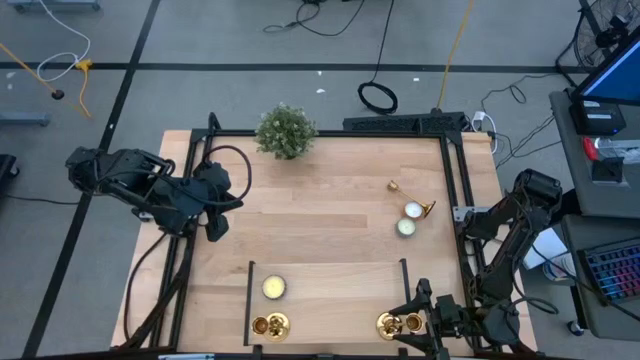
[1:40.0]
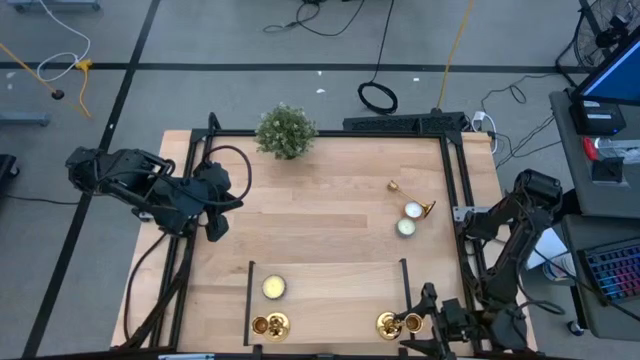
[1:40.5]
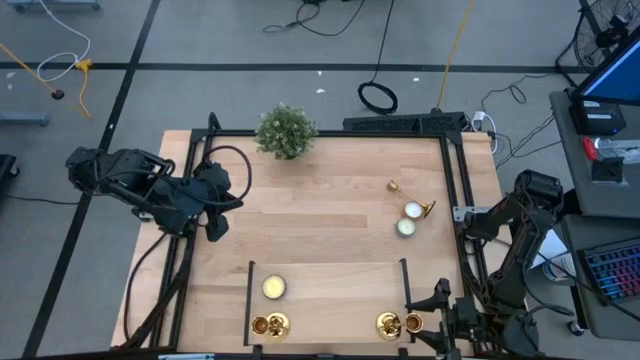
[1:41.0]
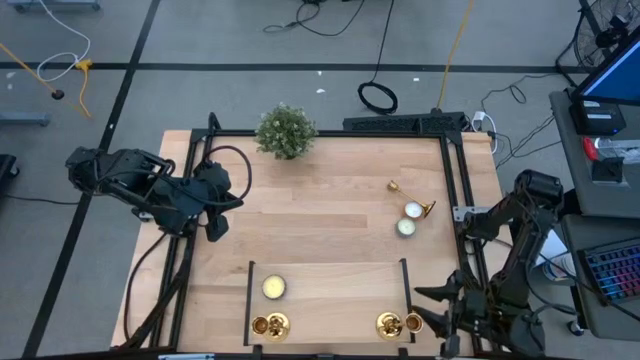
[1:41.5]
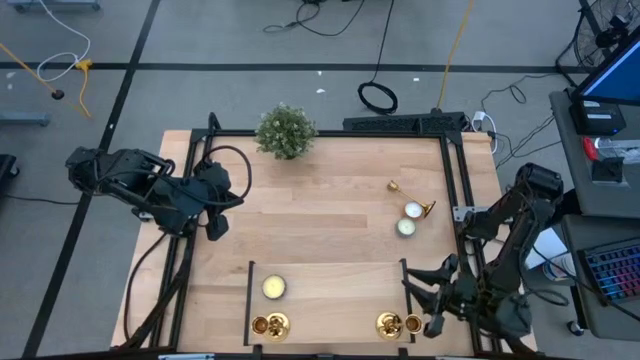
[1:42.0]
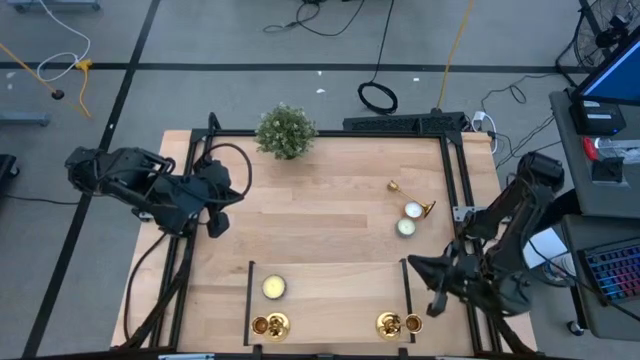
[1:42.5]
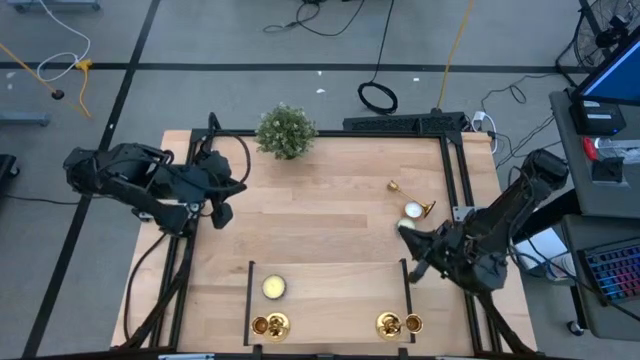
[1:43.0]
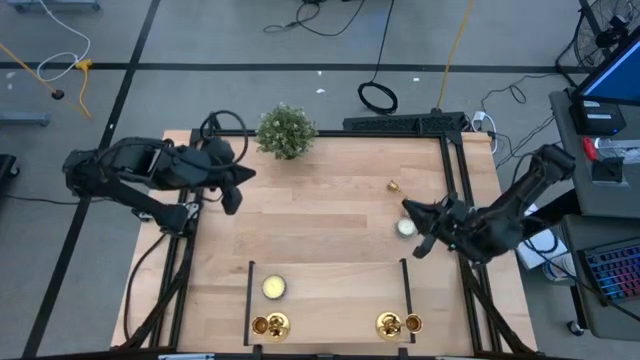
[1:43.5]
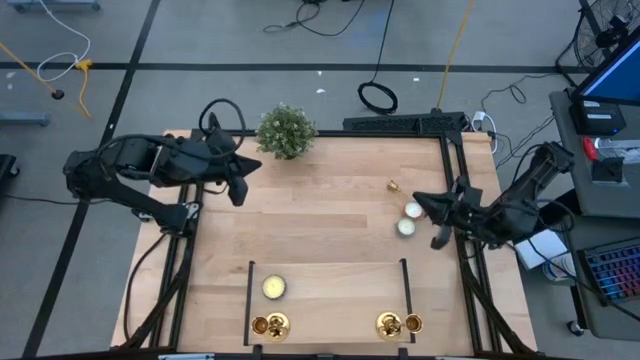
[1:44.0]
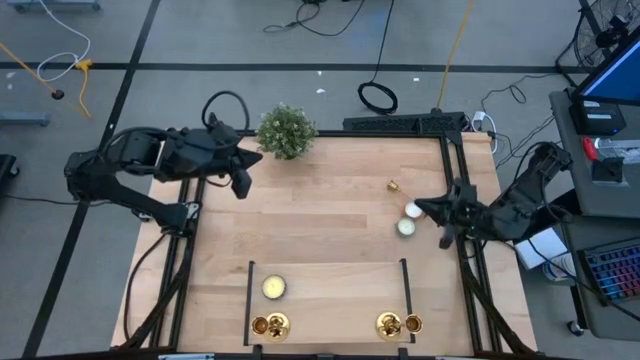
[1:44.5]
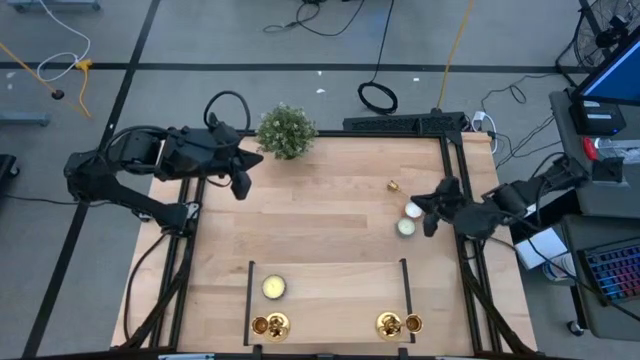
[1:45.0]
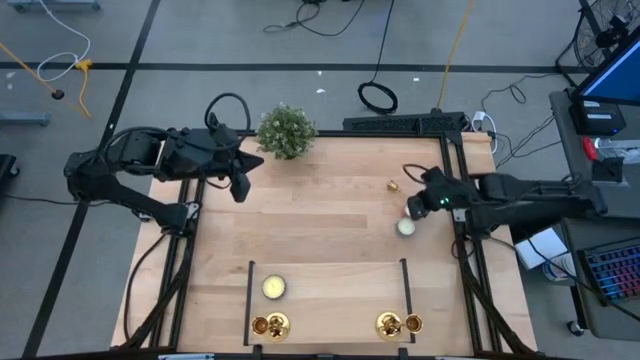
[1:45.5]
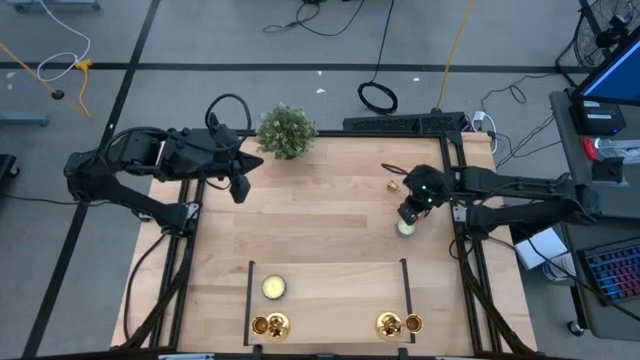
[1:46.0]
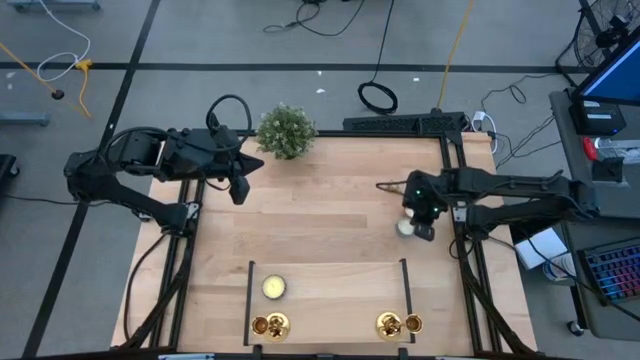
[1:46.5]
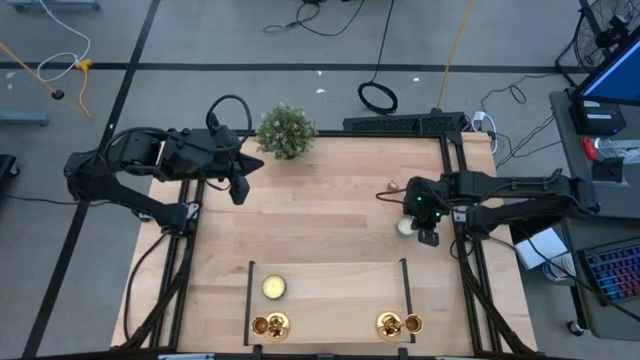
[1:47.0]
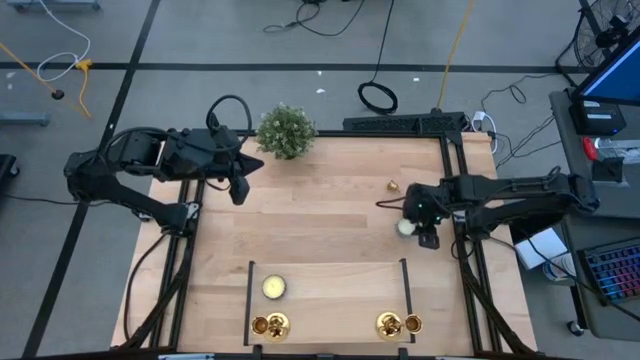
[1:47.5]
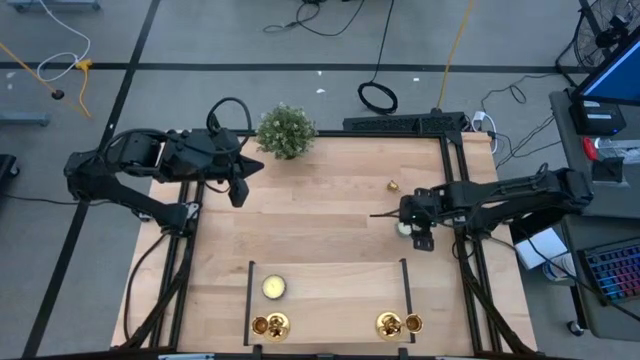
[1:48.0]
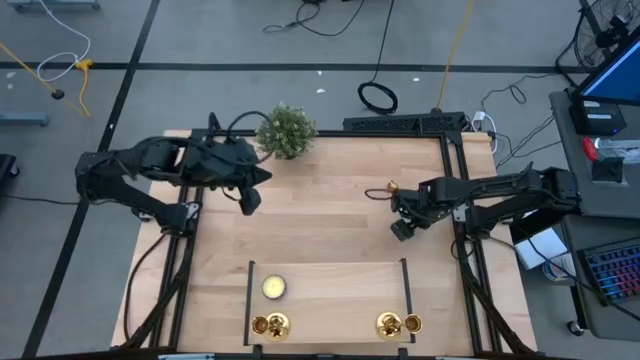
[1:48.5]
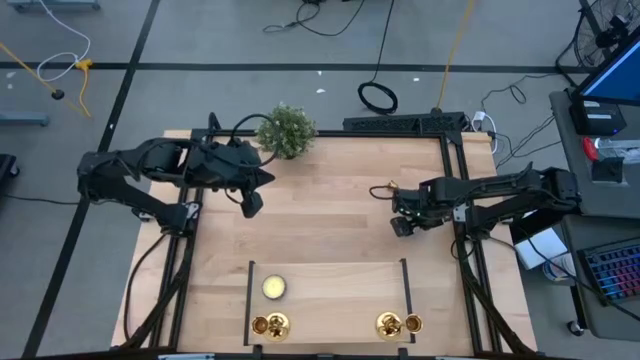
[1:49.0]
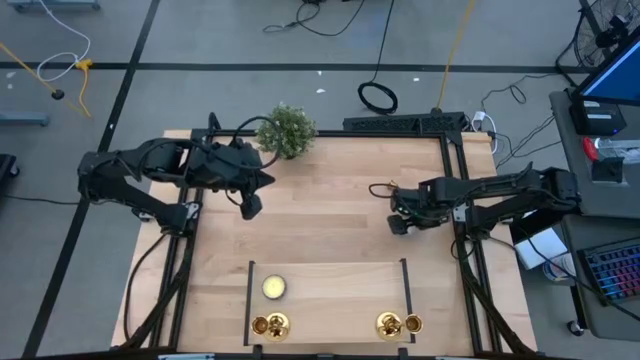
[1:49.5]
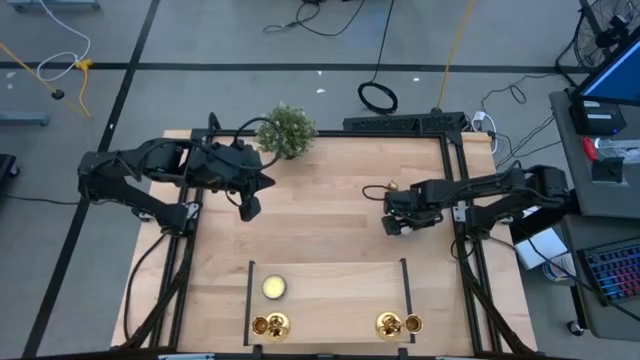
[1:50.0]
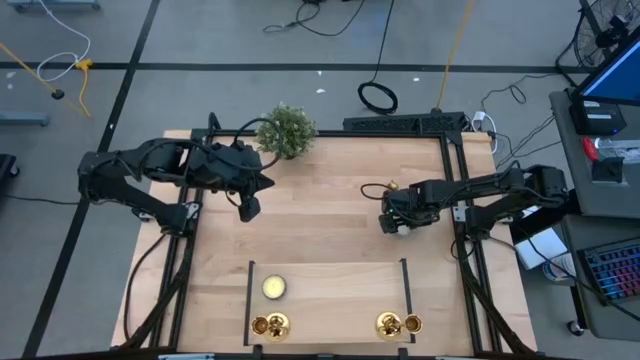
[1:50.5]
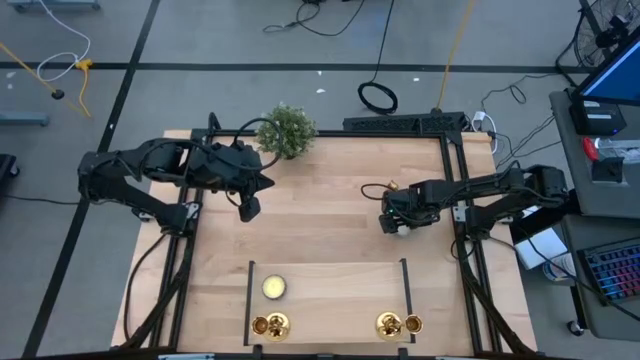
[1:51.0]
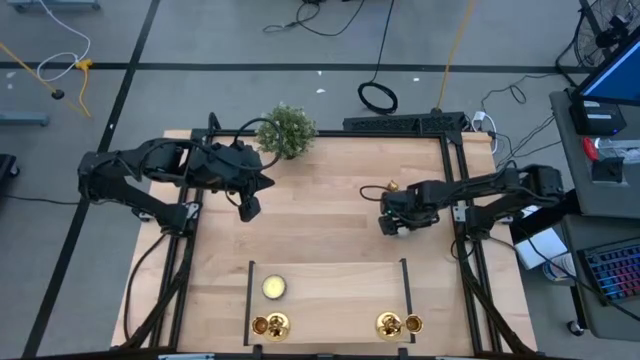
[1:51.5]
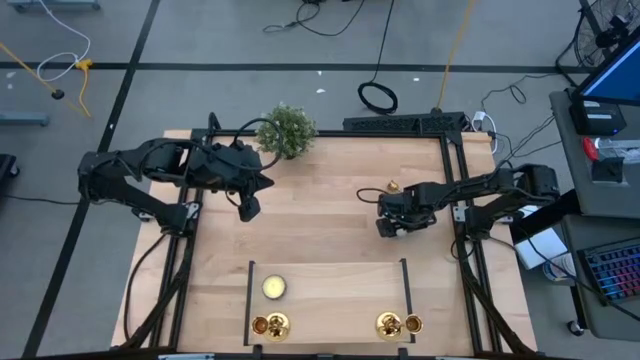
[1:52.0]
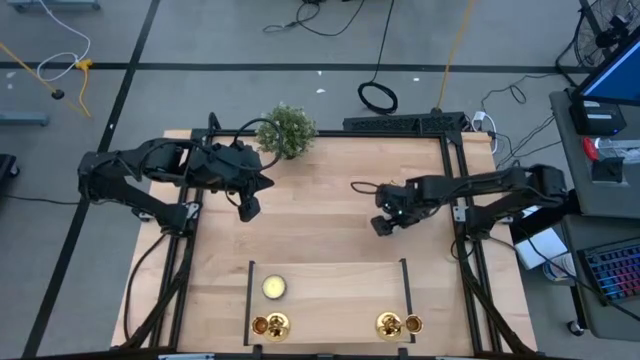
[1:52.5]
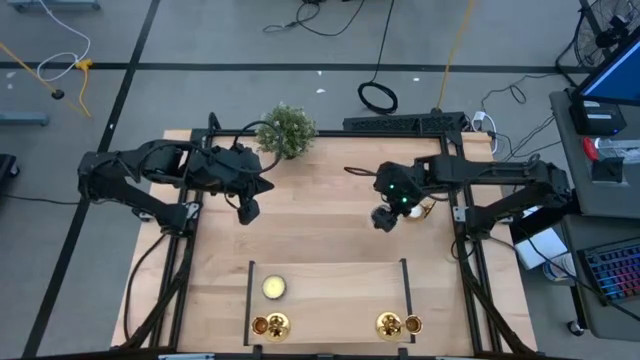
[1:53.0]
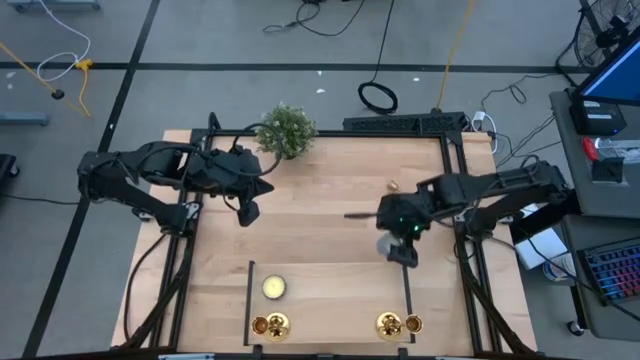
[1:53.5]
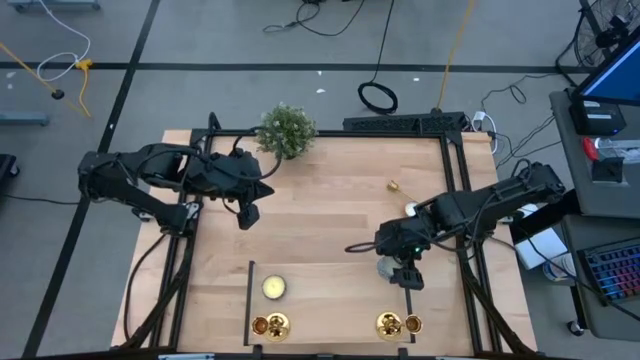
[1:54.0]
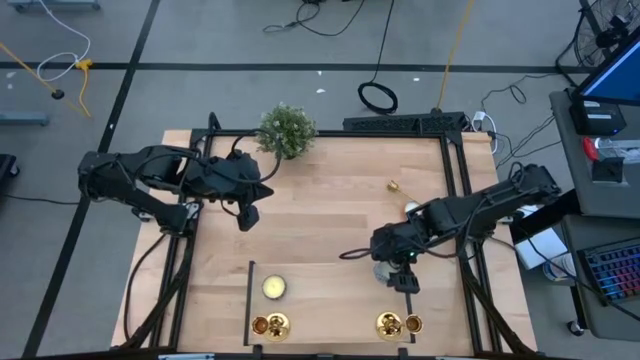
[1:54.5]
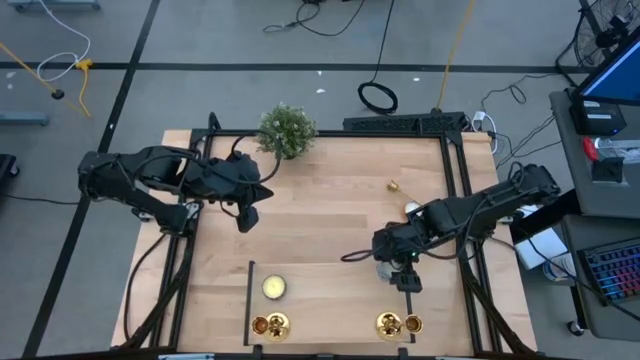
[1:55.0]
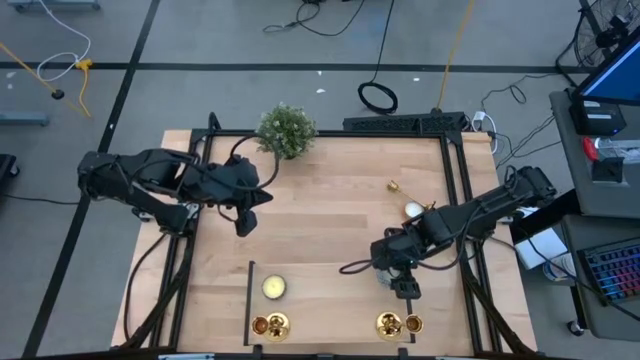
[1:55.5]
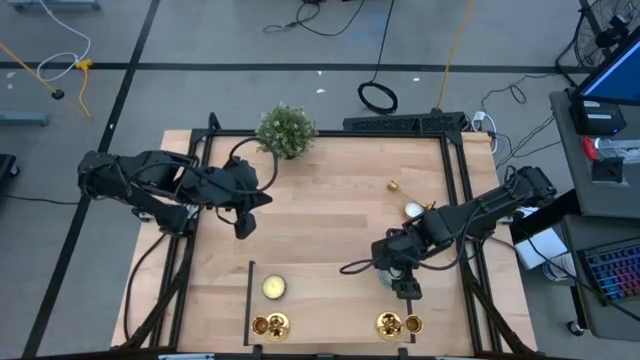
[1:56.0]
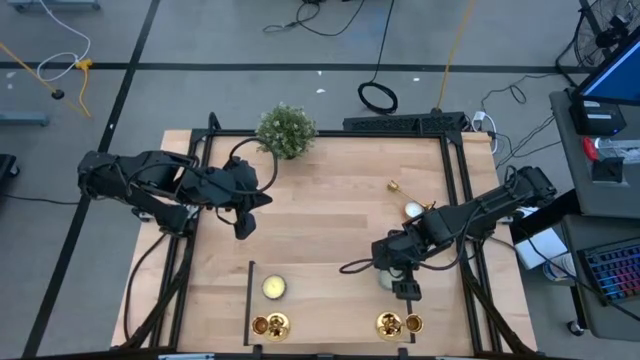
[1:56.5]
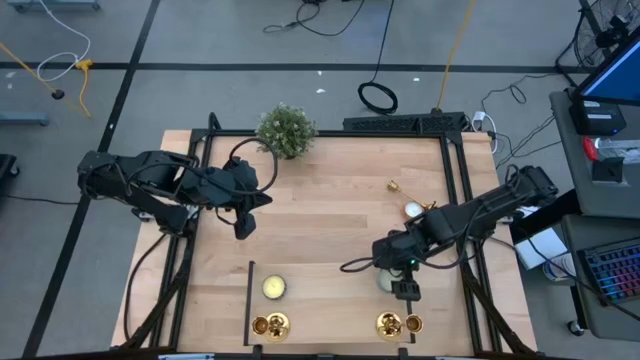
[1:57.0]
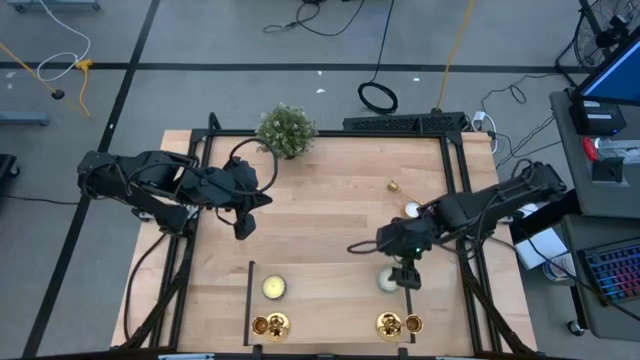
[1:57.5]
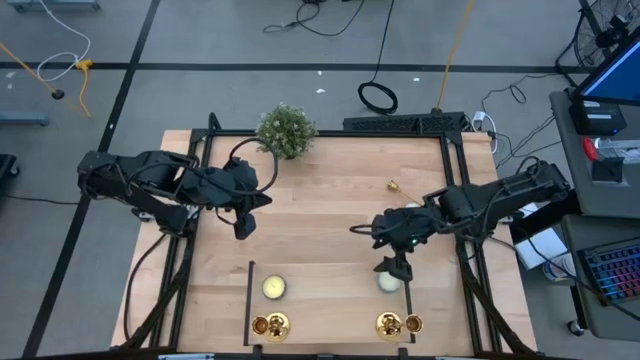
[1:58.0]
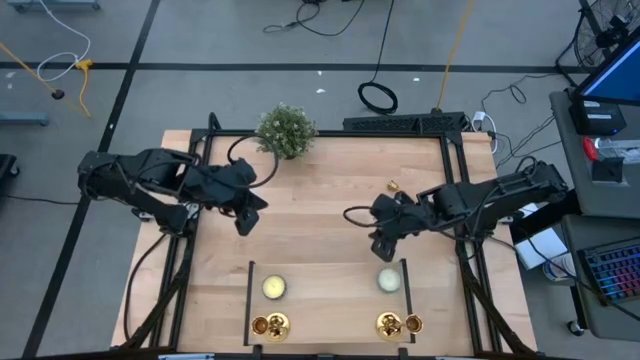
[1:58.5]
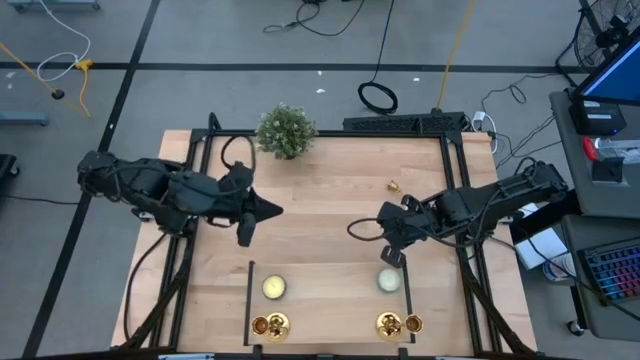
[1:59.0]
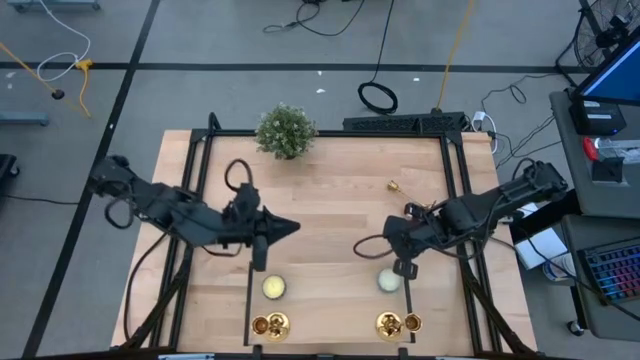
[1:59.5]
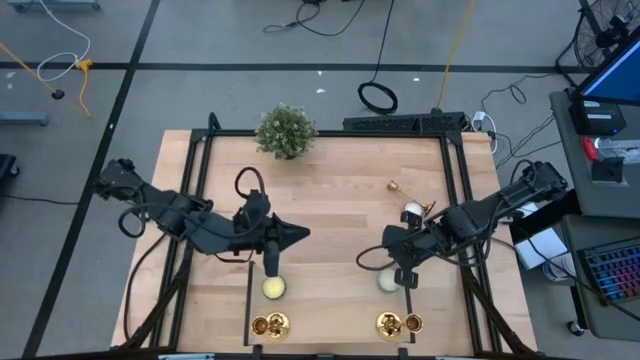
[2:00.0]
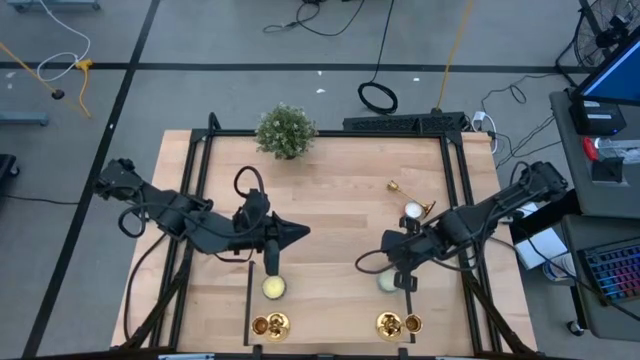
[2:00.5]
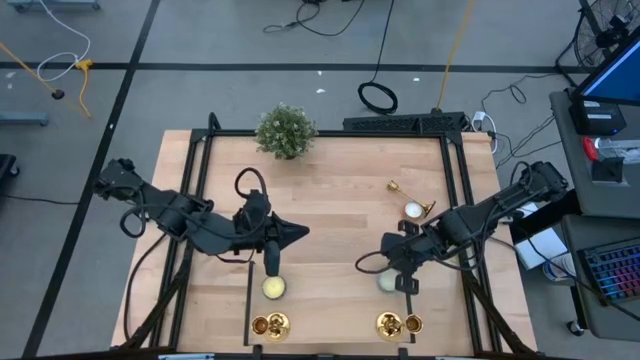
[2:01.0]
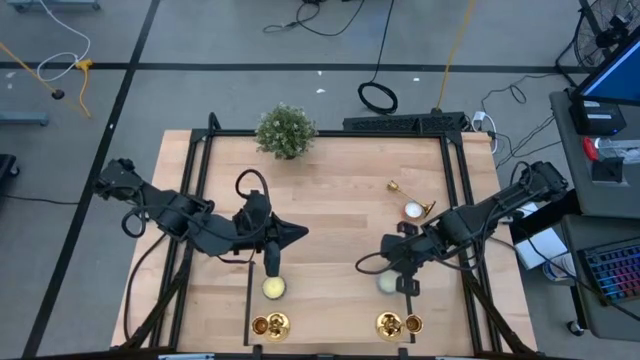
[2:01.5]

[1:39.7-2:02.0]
Task: Pick & Place candle stick holders
Put the blue patterned scented candle on the shelf
